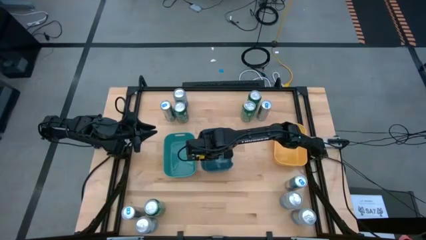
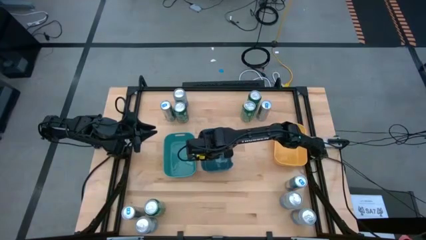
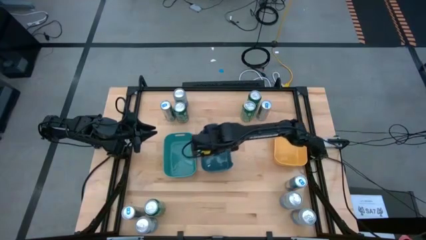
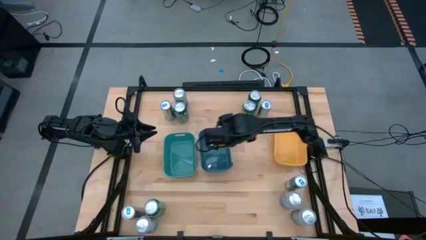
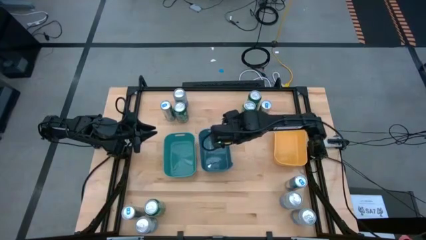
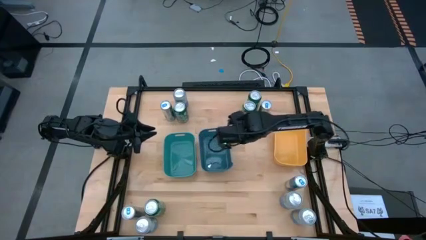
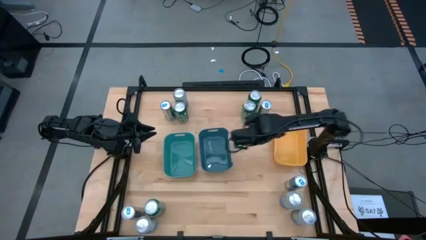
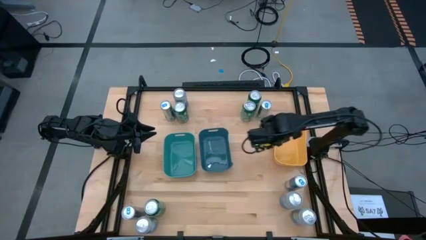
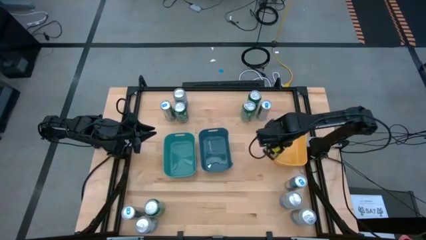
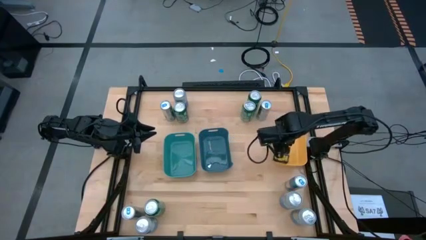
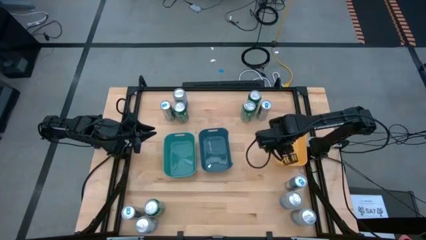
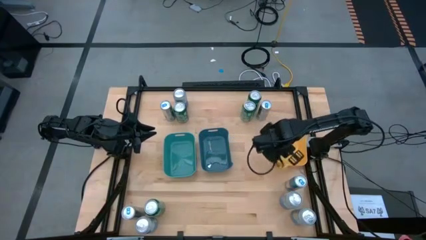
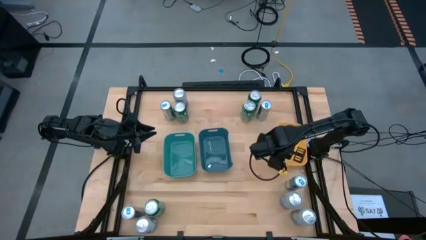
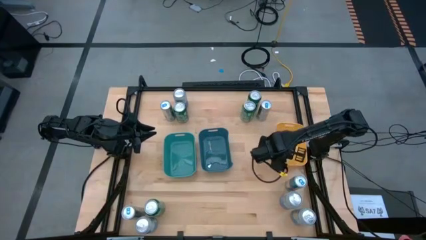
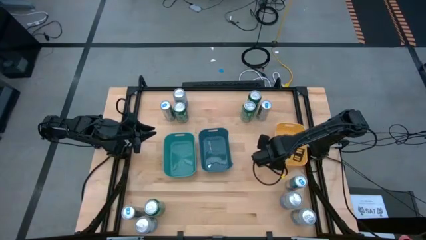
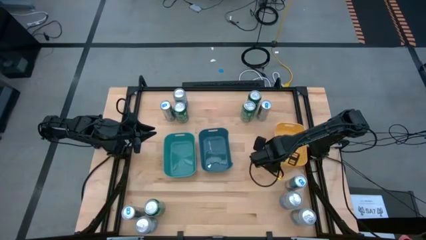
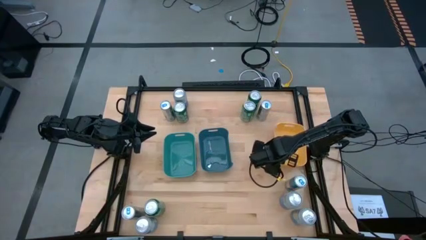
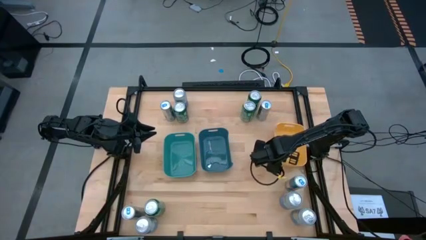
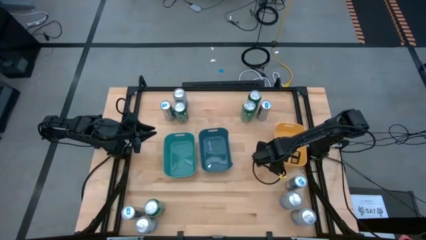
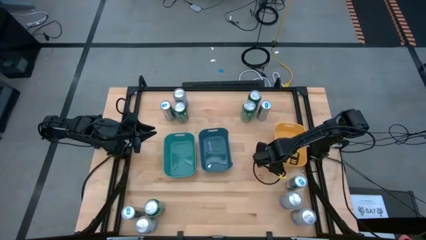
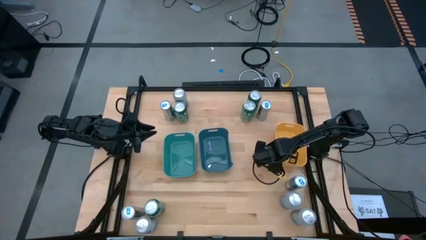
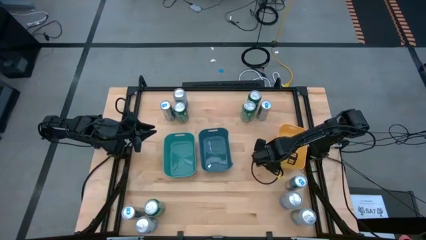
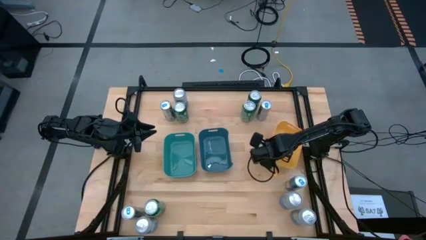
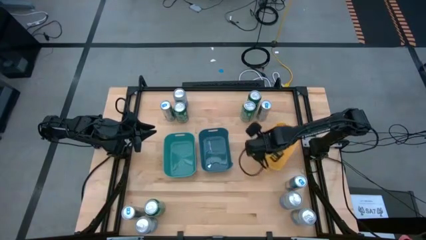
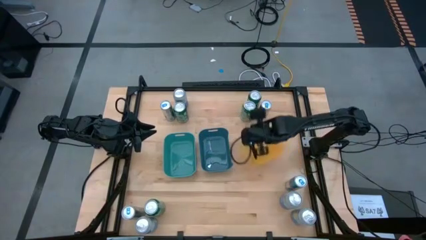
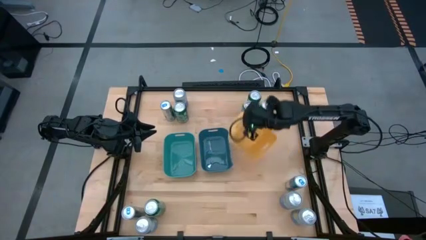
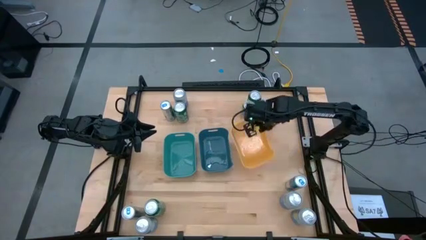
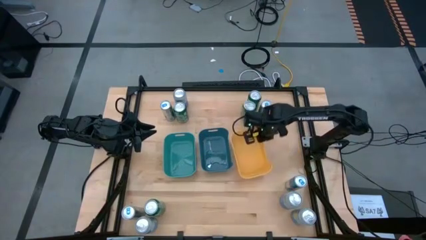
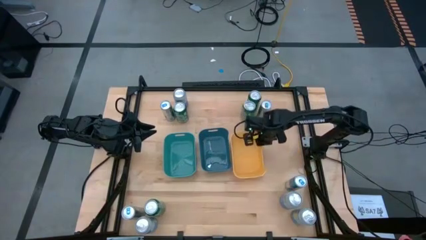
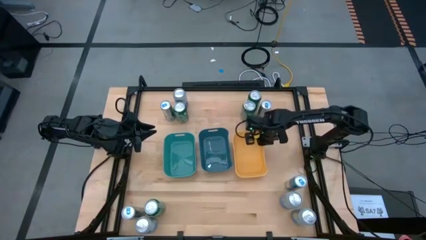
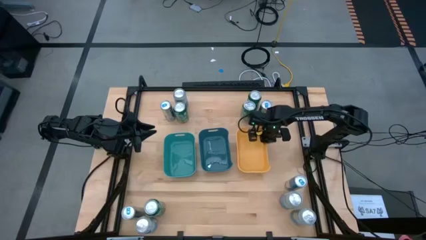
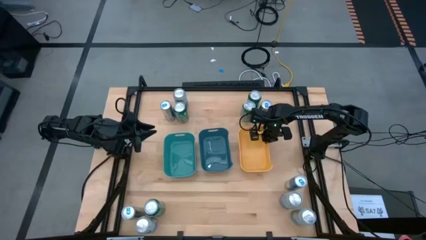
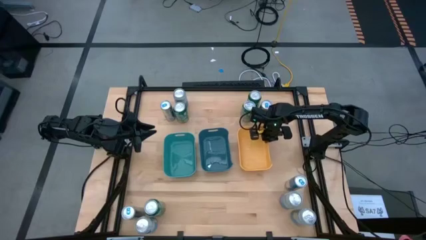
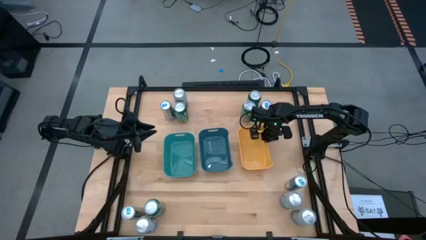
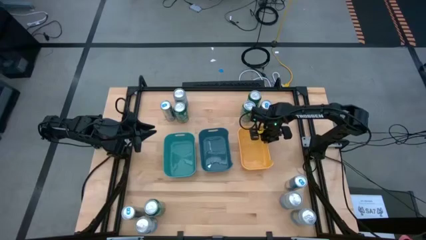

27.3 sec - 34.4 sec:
Task: Sort soda cans
Move the yellow bin to the center right of the table

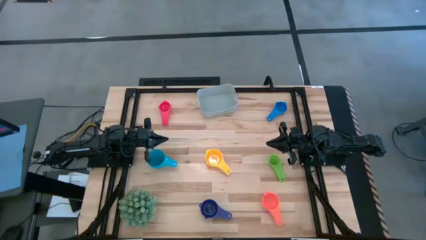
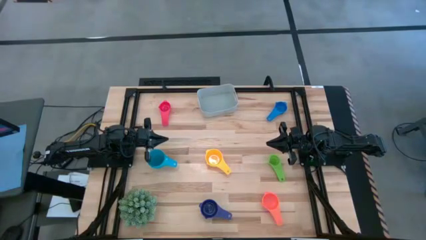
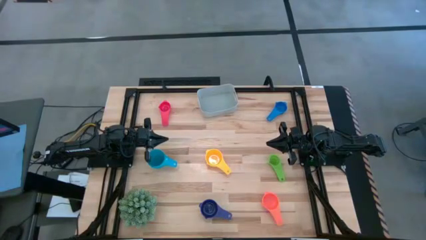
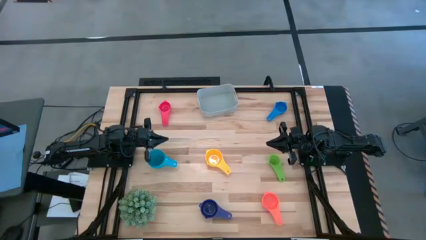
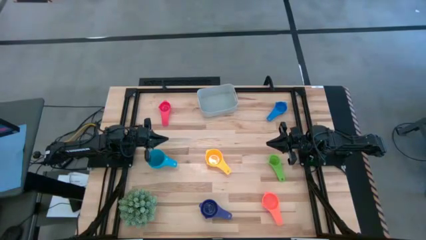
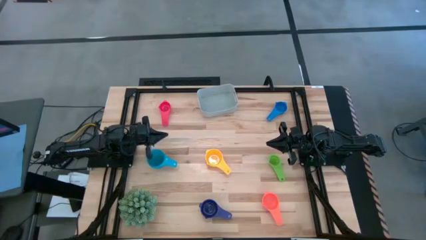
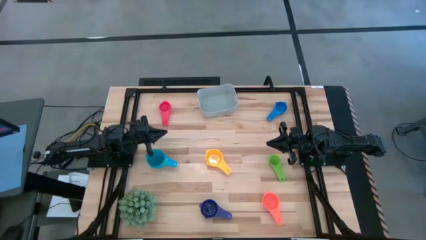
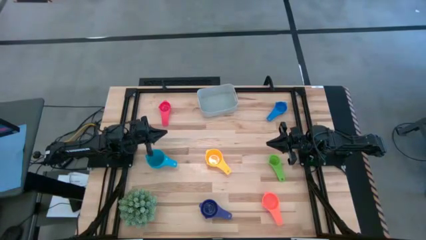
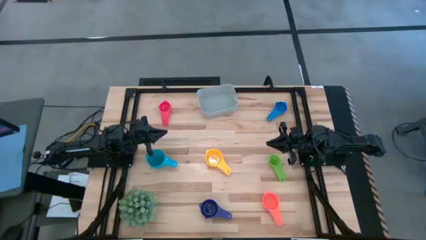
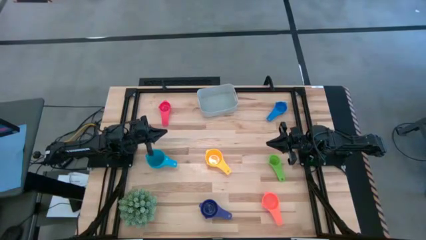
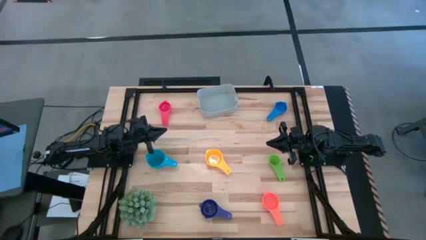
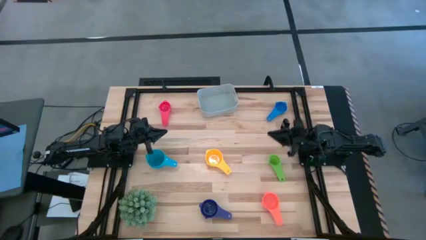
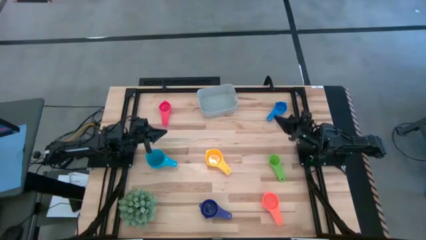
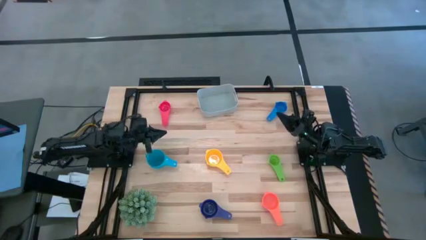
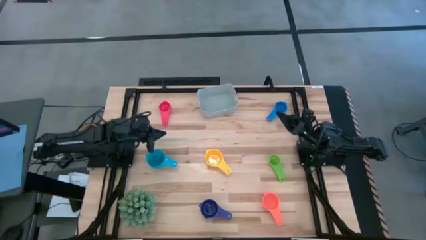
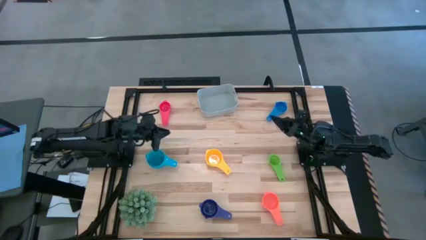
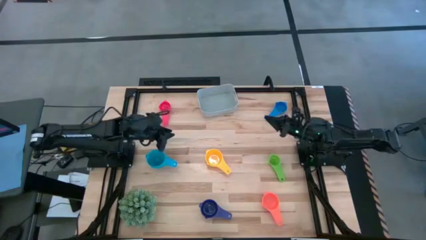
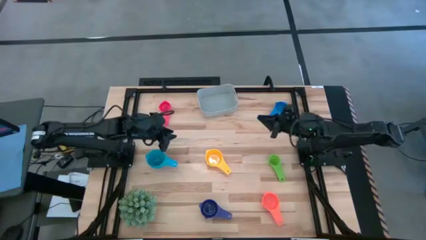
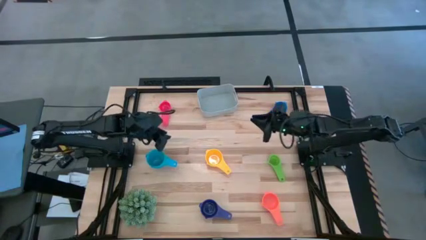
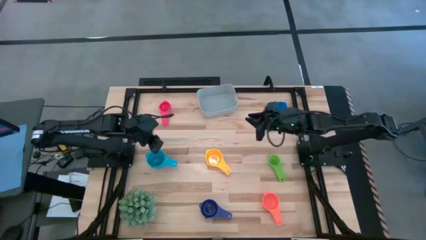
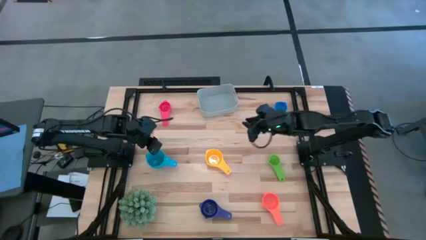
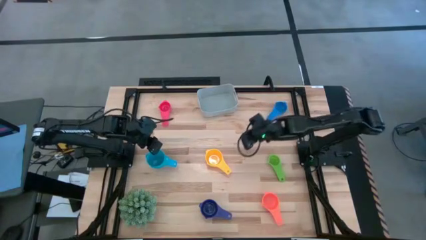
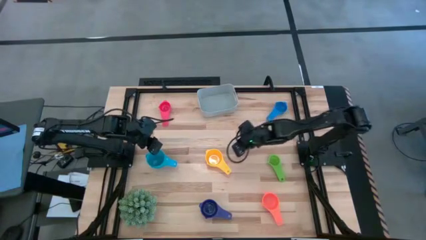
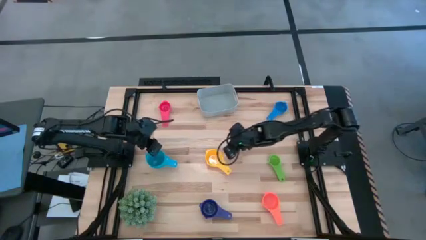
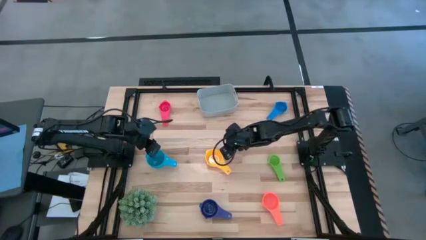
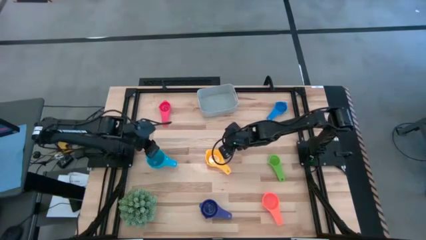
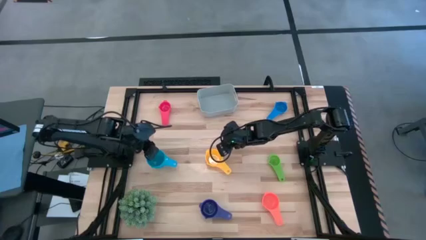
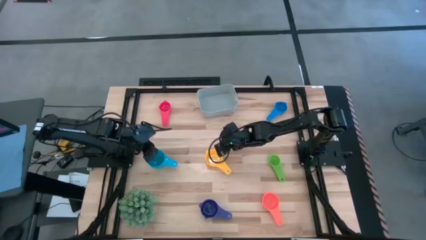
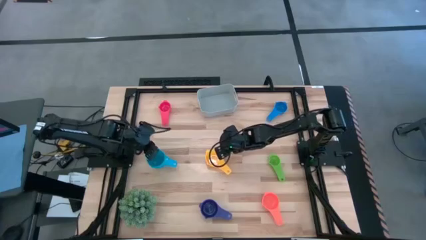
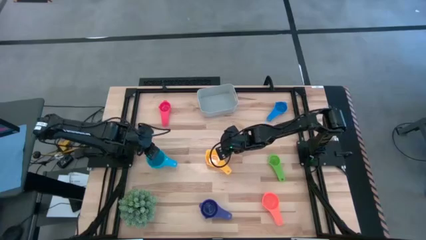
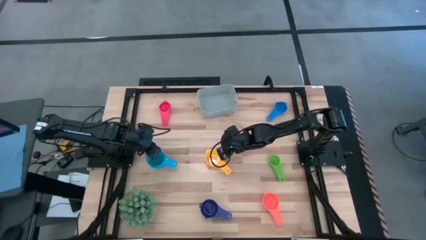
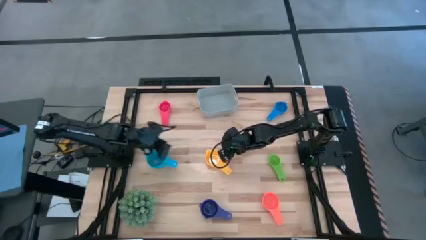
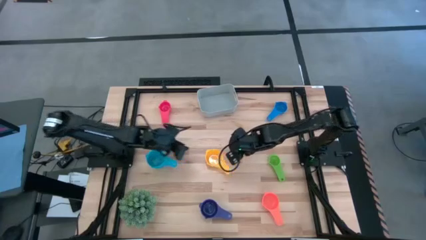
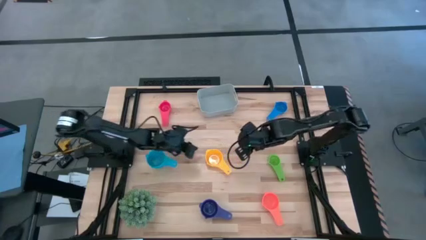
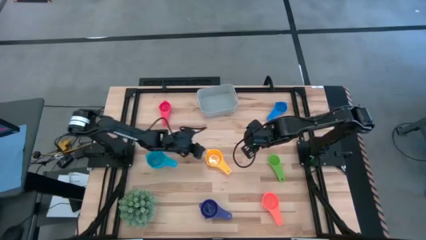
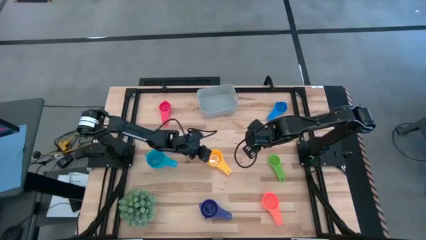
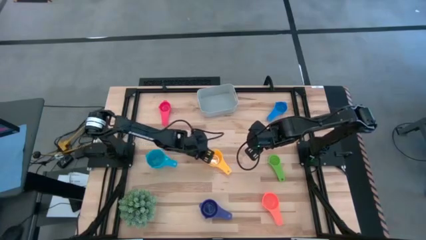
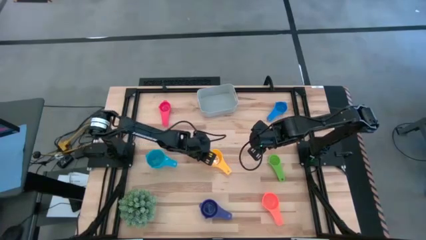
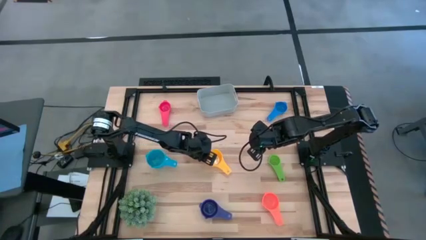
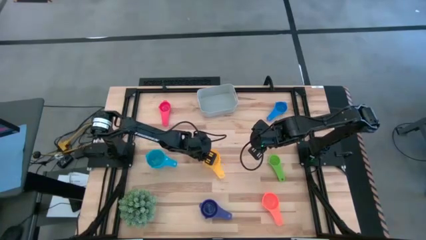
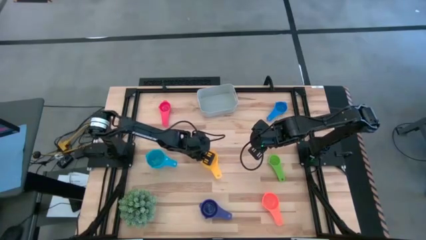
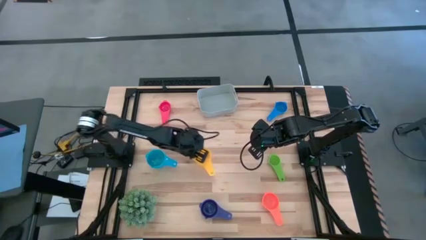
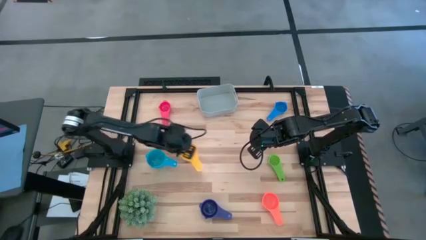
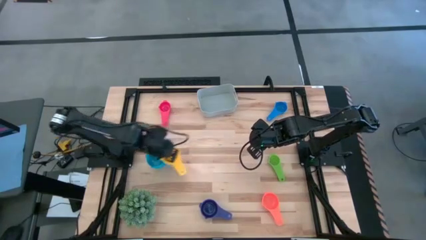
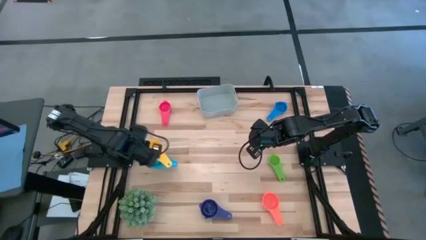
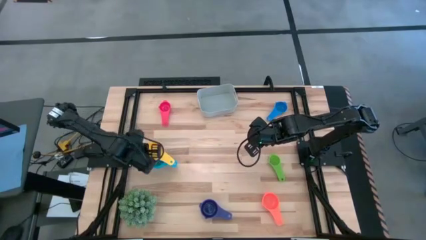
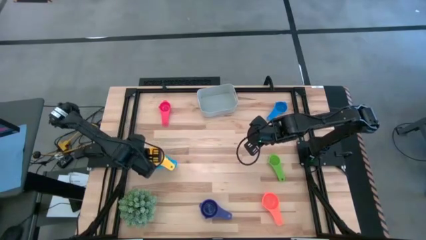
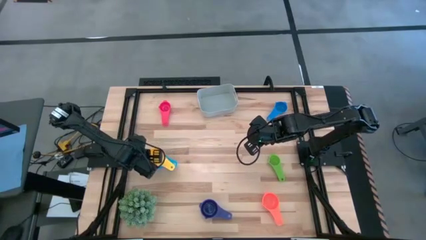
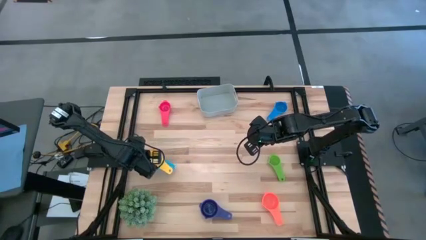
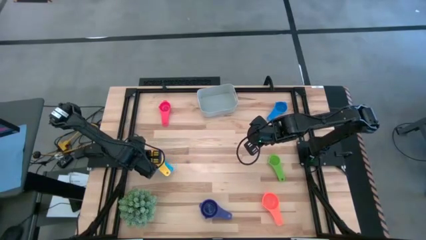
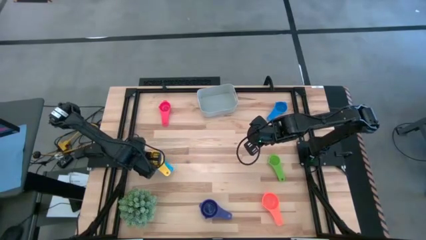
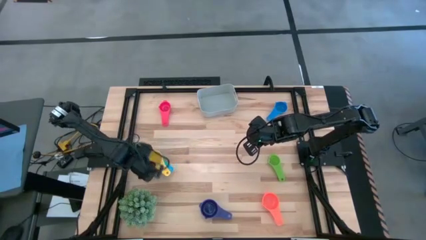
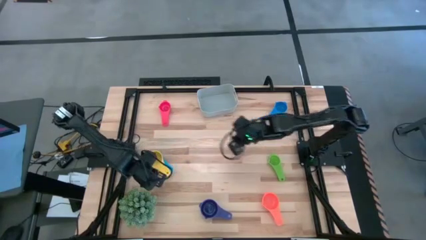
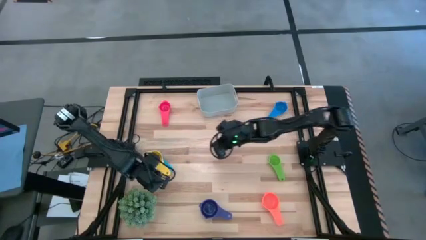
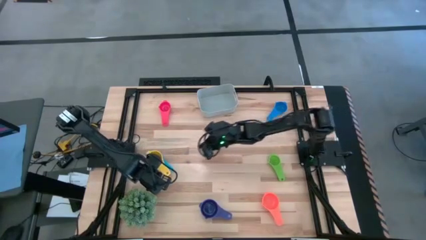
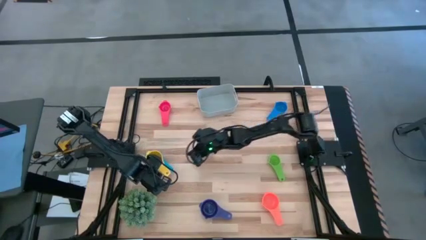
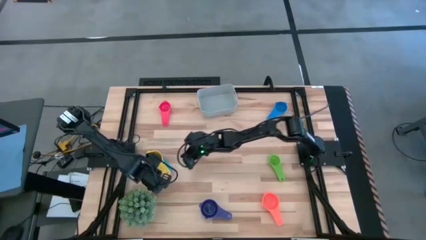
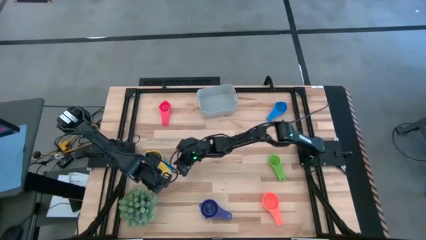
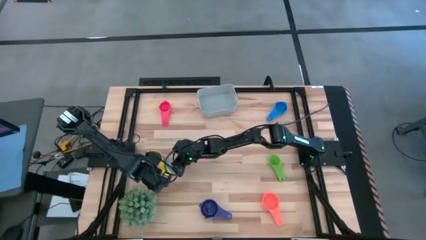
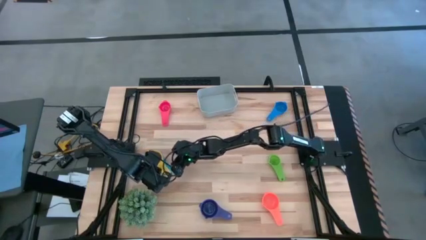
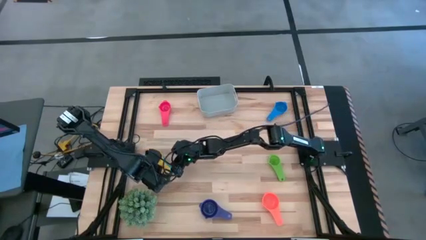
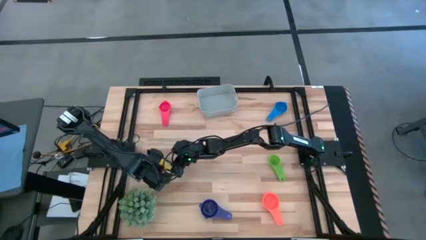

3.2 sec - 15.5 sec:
Task: Nest measuring cups in basket
Stack the yellow measuring cup on the light blue measuring cup
